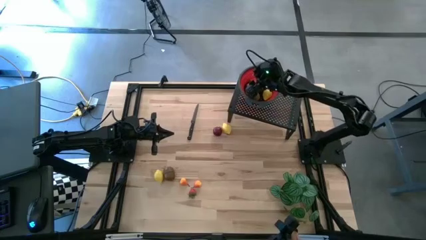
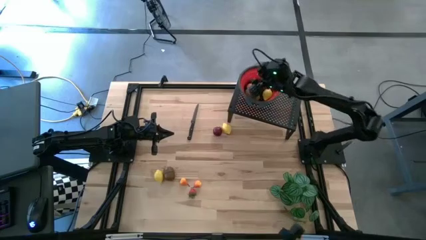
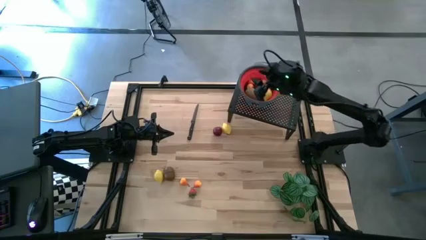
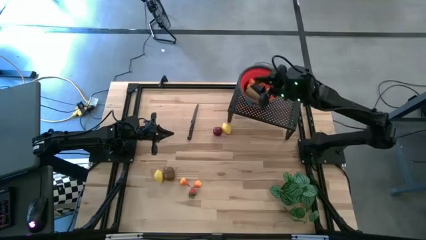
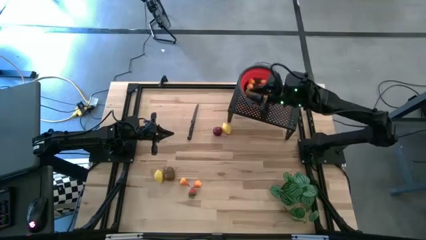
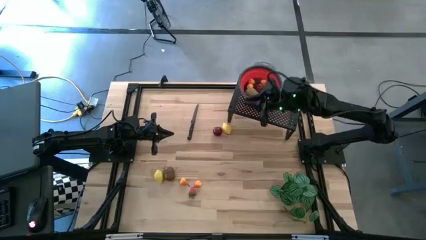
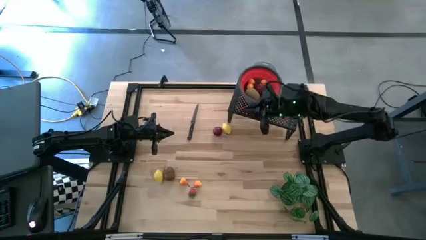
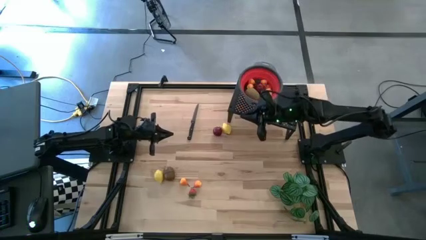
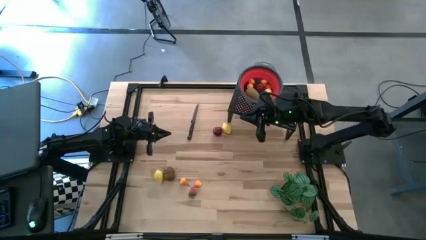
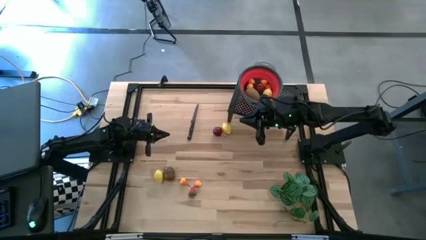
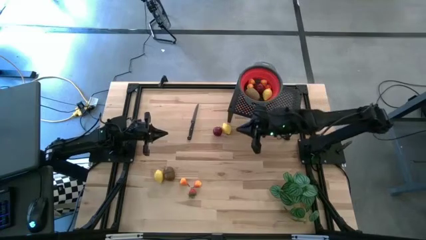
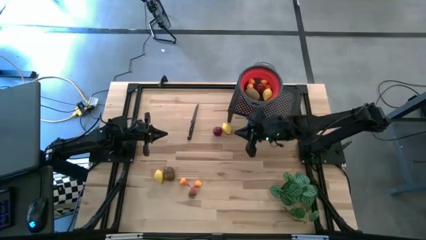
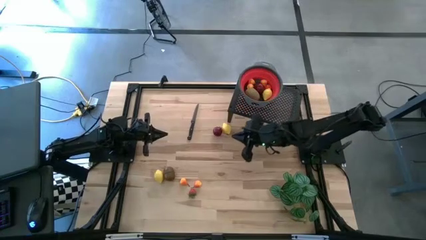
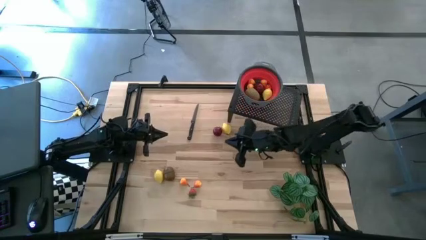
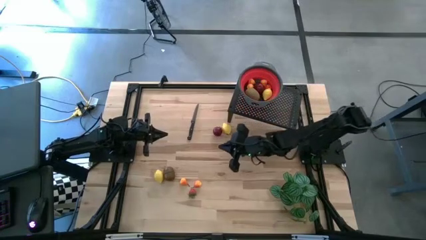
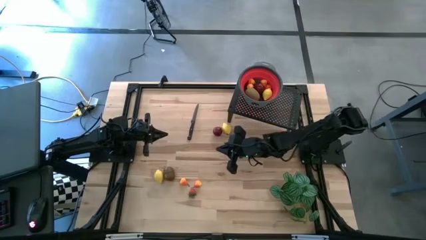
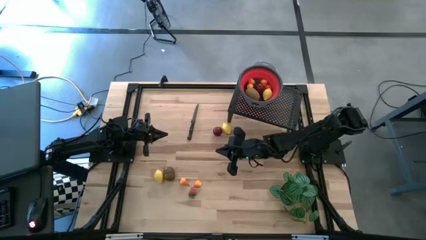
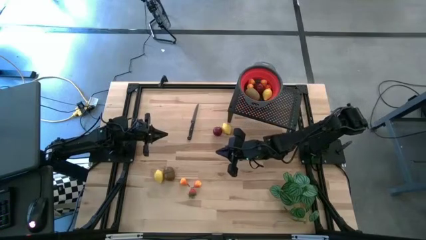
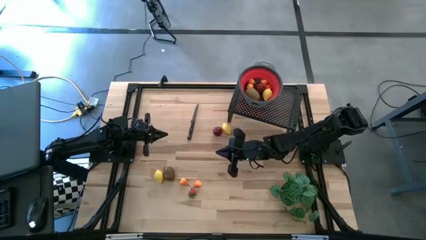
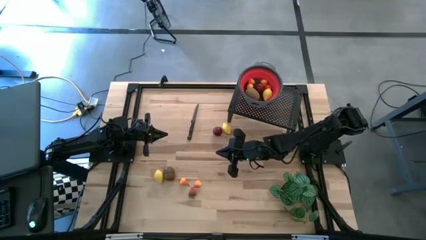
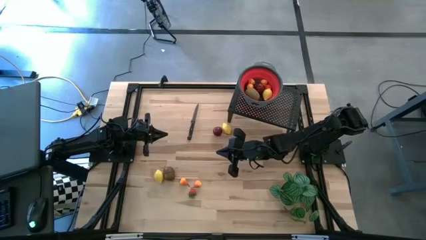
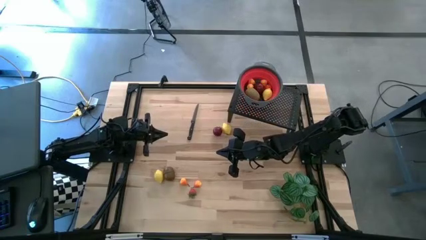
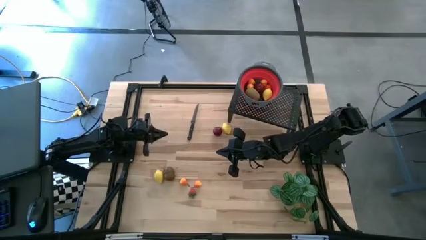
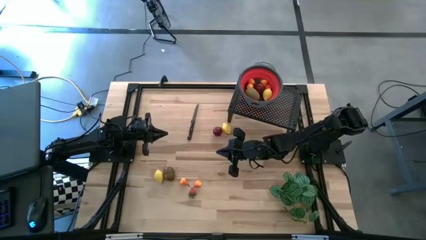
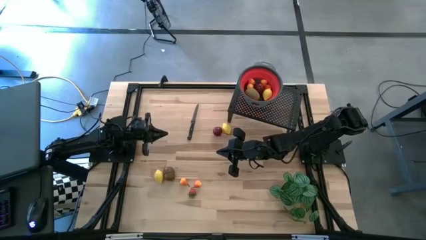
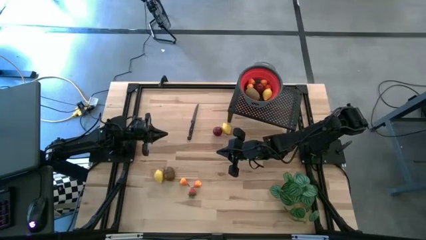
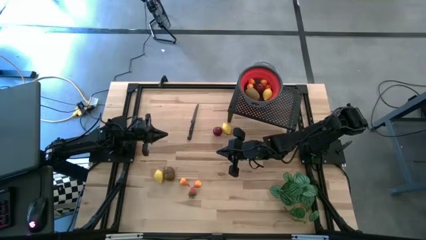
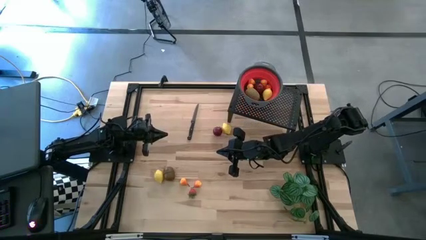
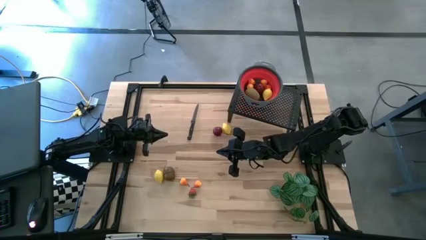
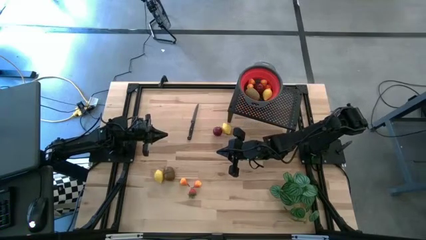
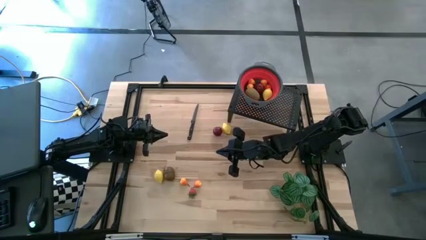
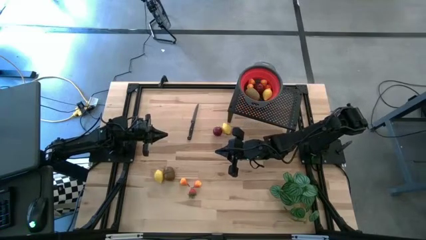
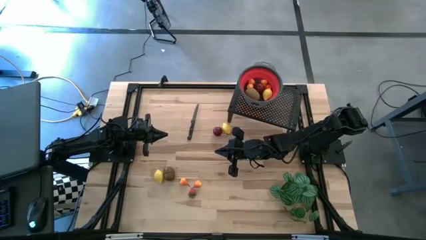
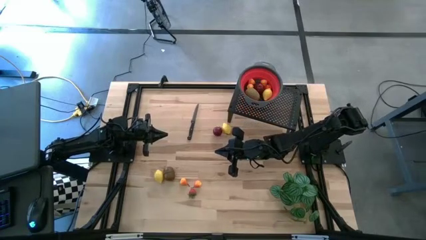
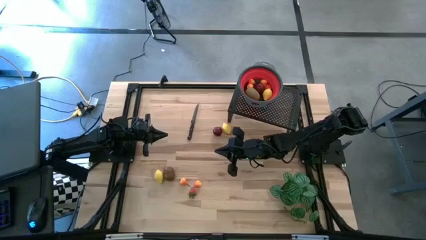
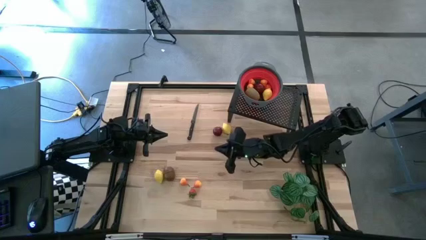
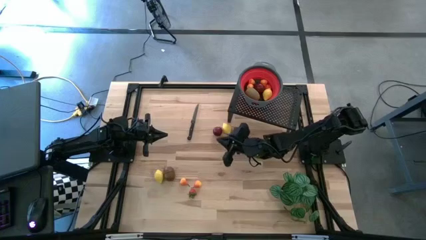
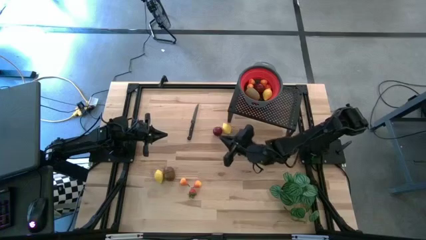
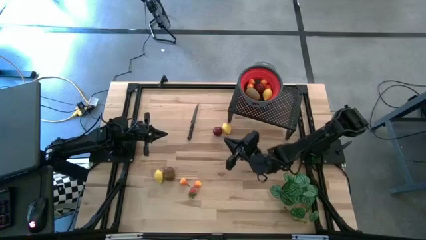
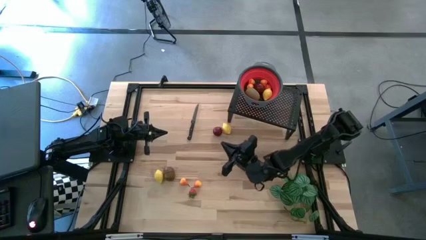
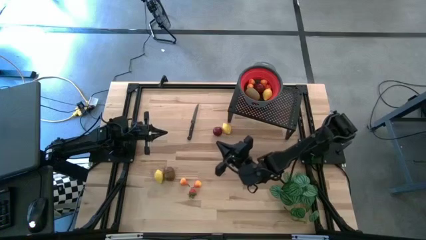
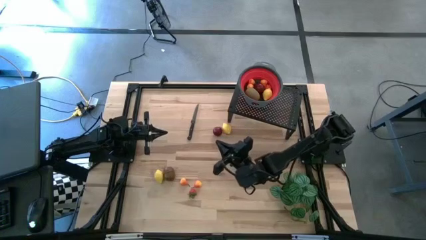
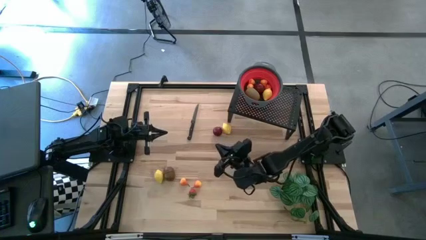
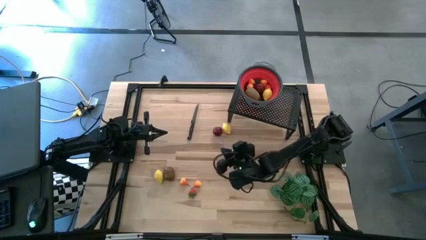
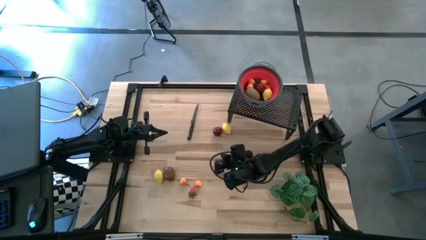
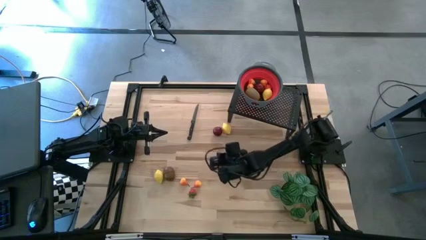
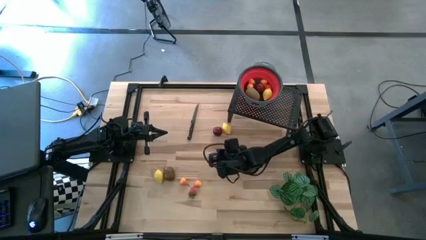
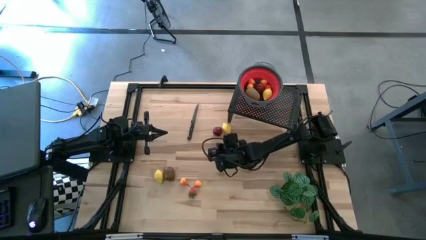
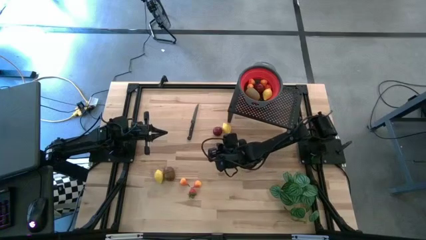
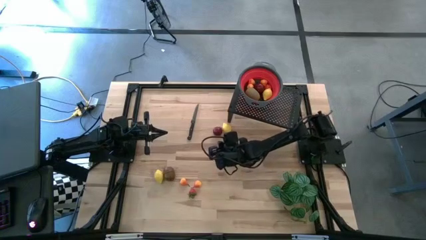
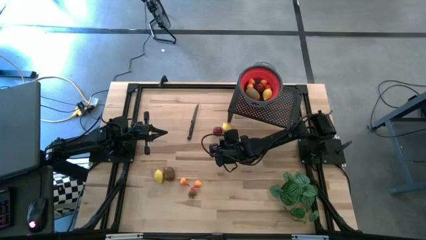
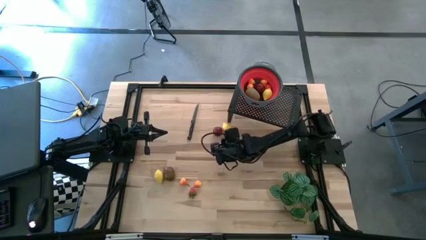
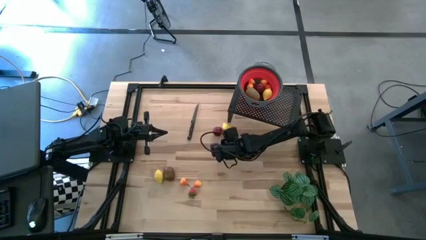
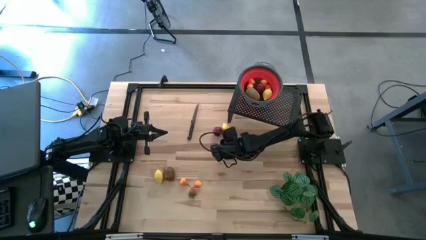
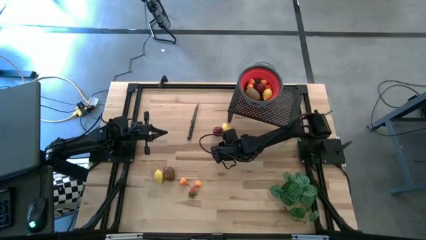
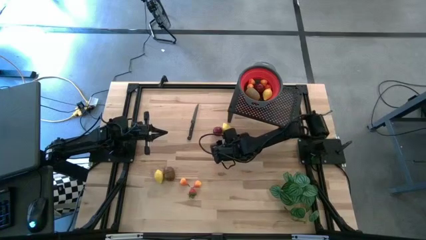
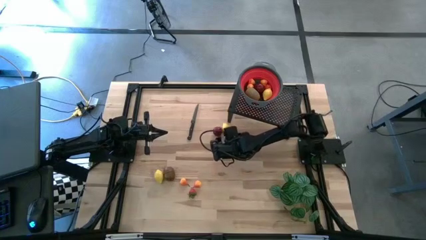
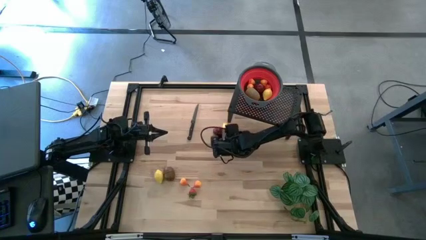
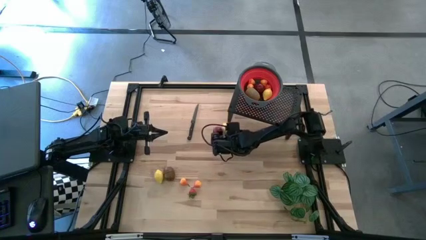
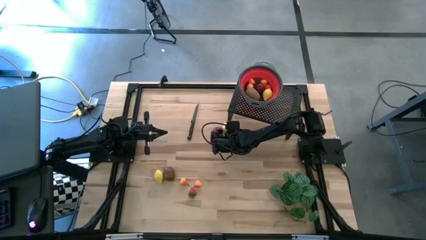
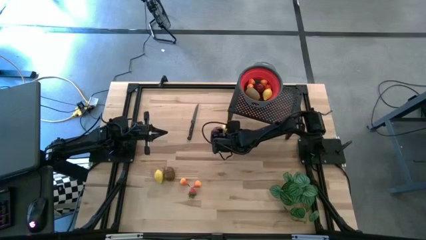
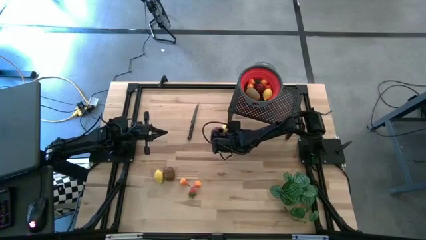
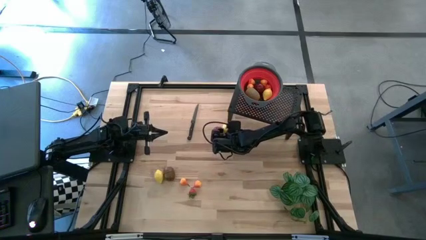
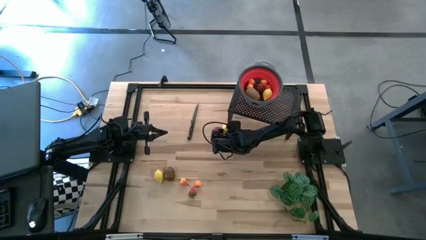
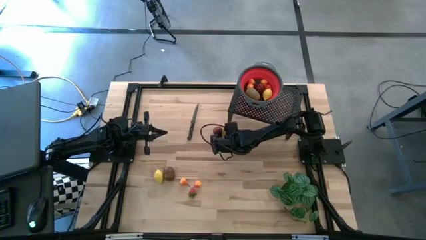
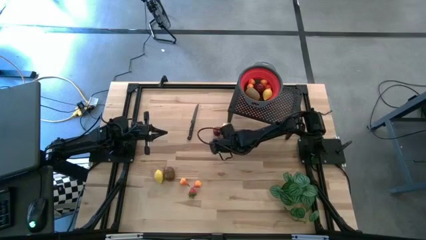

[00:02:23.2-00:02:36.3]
Task: Pick & Place Fruit
Put the yellow lemon into the red strainer bowl on the shelf

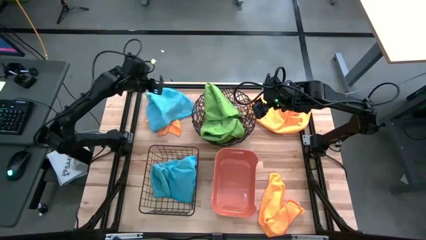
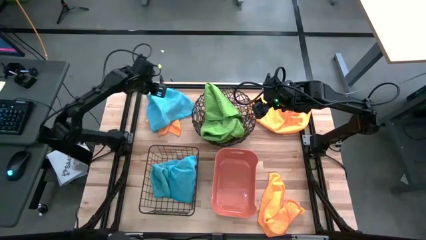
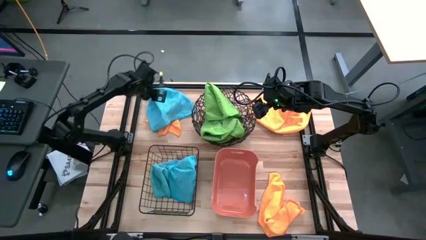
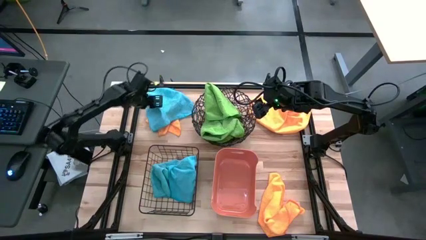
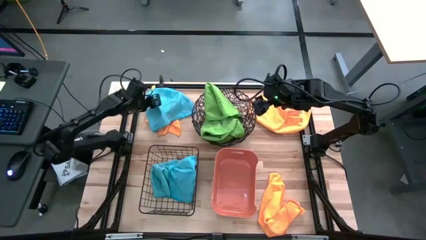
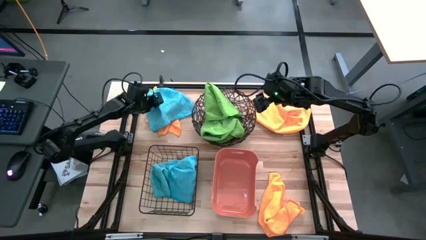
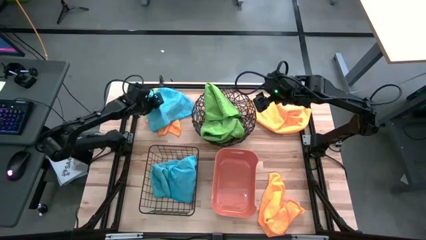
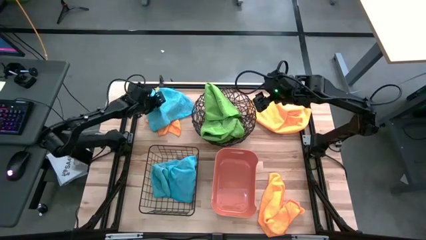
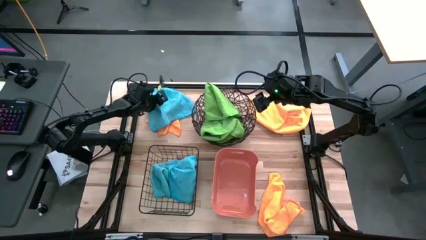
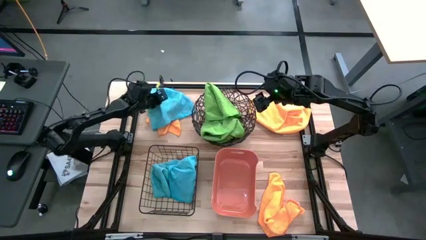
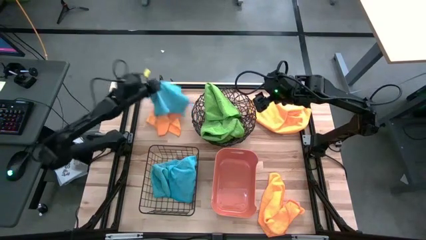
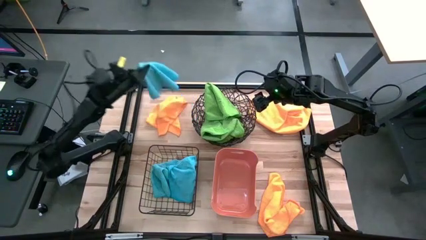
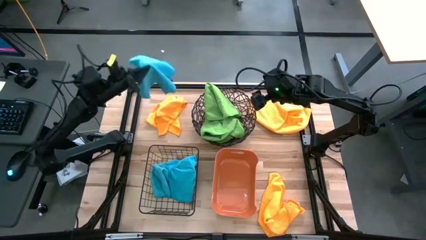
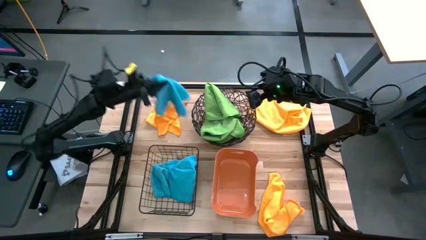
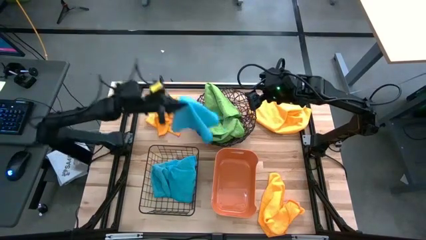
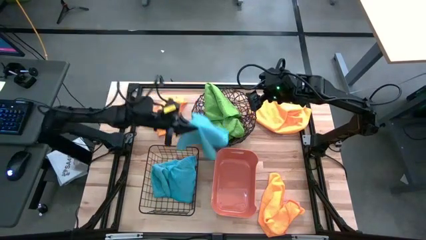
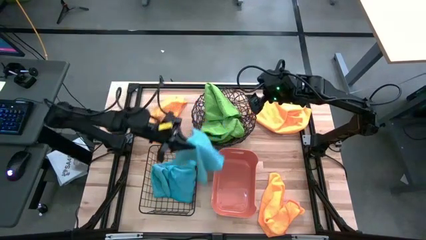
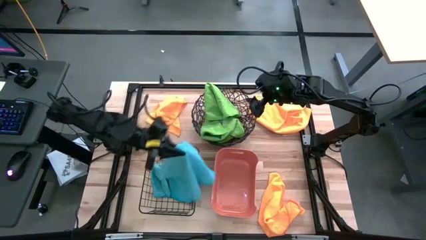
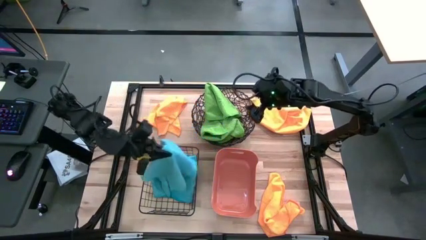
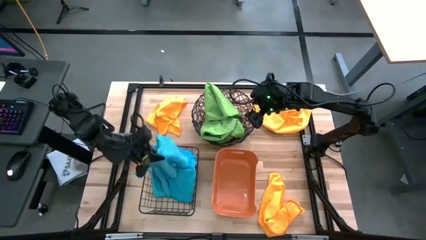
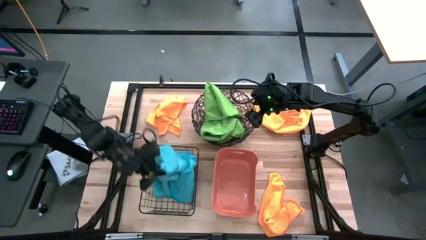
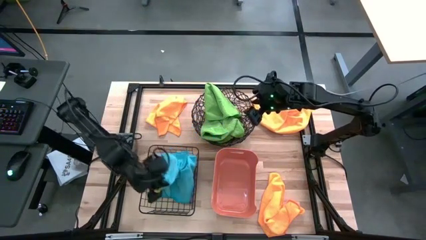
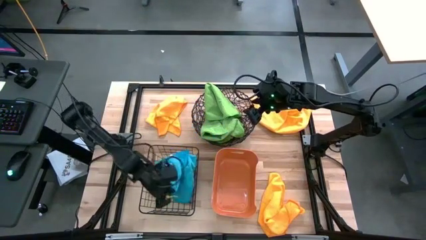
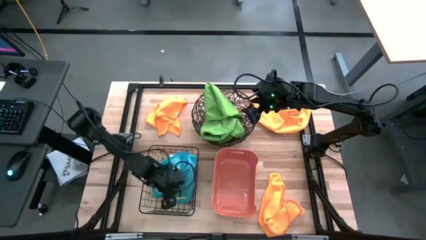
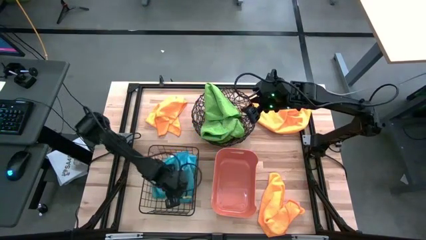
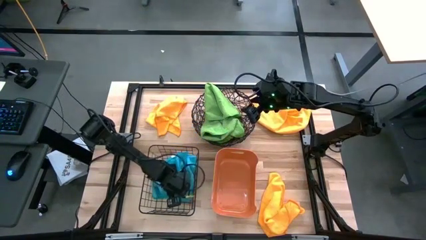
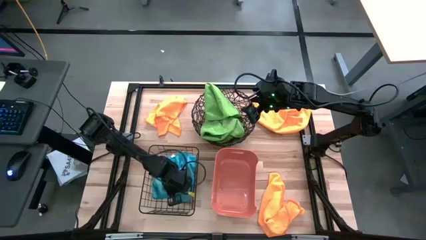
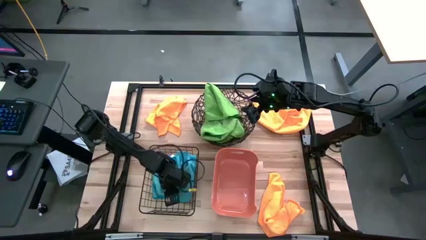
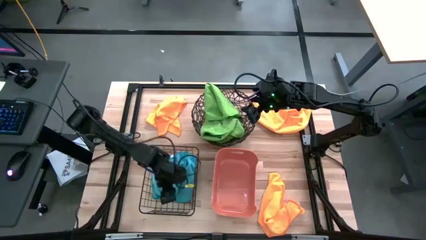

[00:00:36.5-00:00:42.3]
Task: Sort microfiber towel by color & place in baskets
Put the blue microfiber towel into the black wire basket
